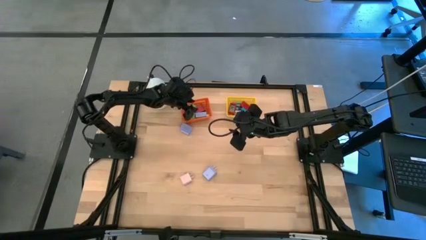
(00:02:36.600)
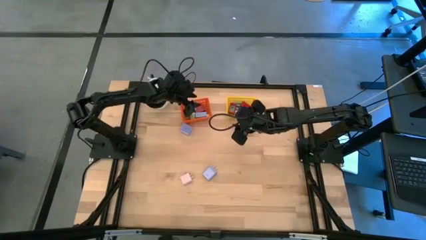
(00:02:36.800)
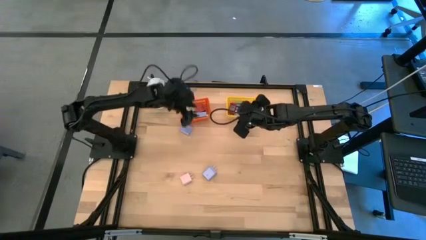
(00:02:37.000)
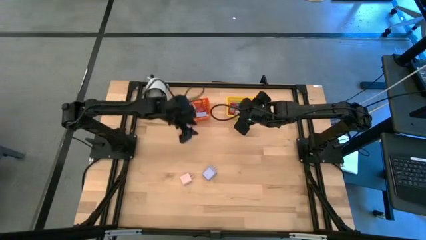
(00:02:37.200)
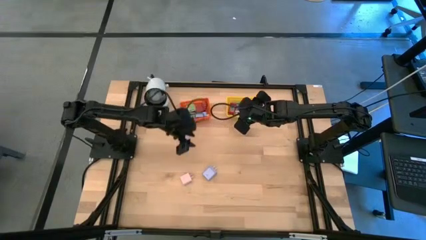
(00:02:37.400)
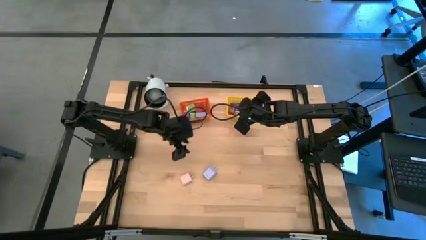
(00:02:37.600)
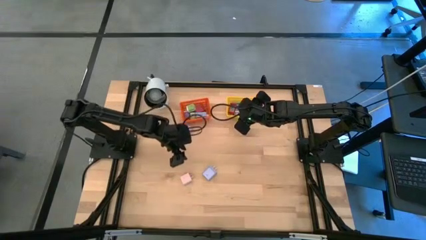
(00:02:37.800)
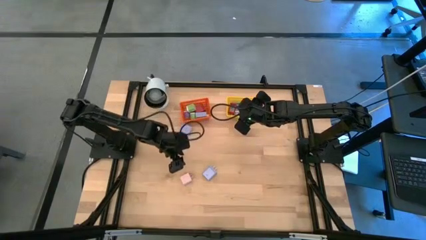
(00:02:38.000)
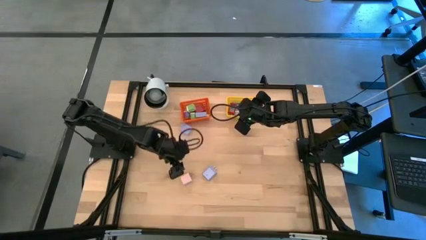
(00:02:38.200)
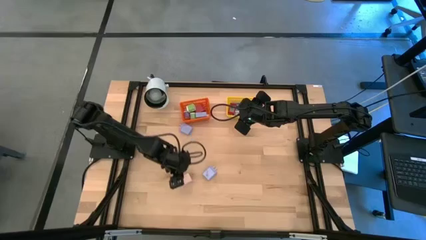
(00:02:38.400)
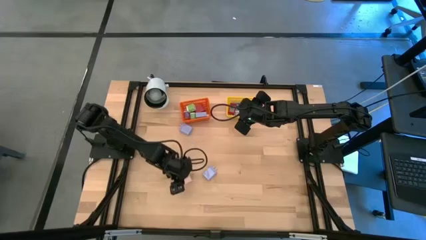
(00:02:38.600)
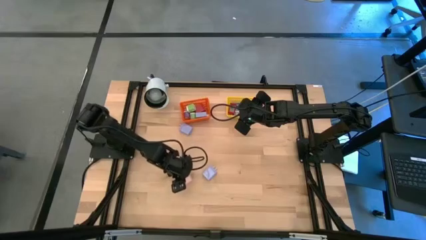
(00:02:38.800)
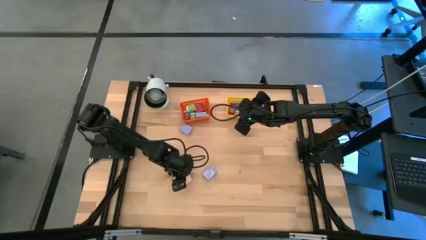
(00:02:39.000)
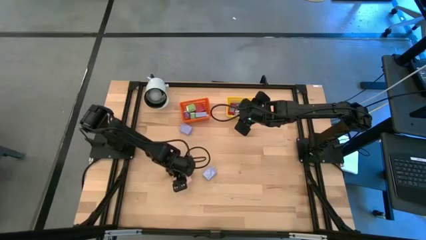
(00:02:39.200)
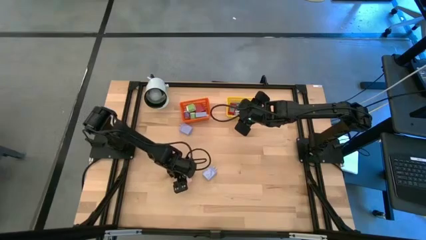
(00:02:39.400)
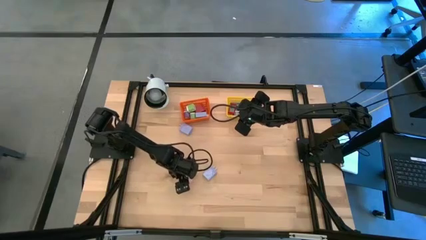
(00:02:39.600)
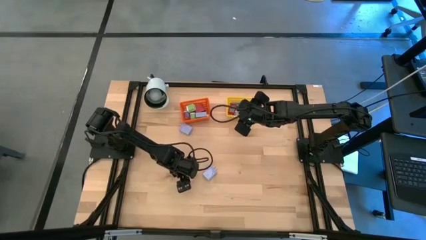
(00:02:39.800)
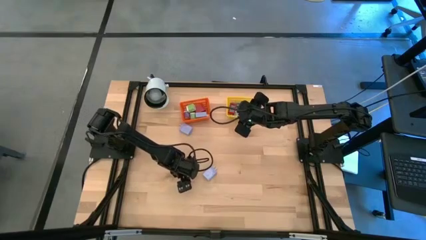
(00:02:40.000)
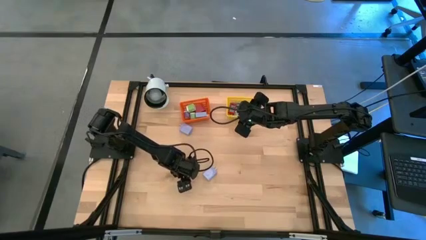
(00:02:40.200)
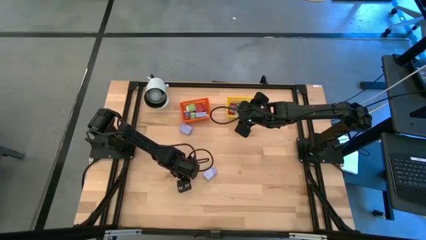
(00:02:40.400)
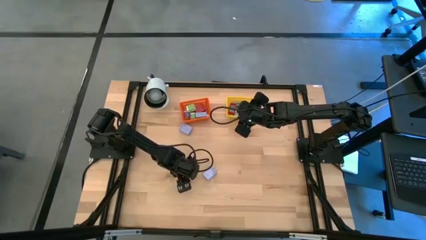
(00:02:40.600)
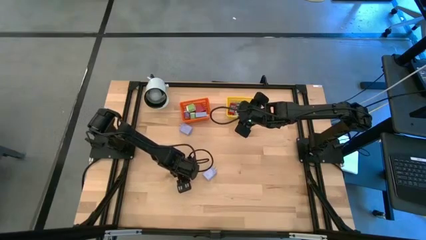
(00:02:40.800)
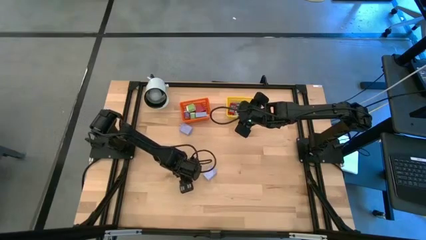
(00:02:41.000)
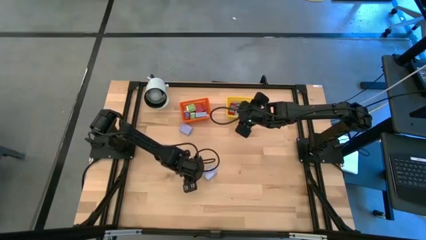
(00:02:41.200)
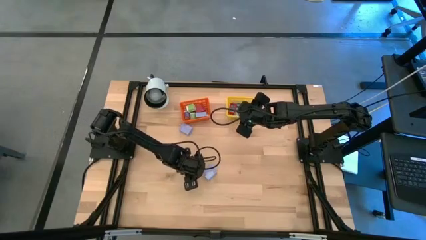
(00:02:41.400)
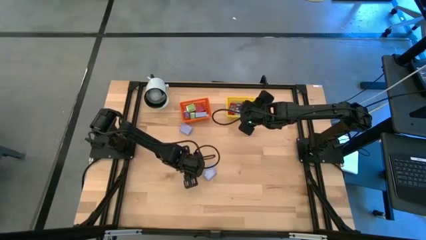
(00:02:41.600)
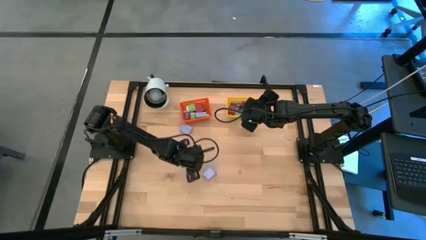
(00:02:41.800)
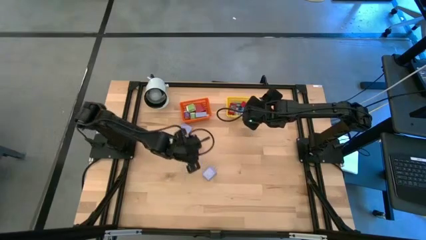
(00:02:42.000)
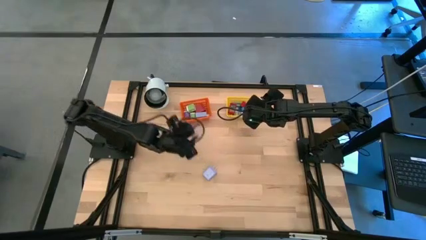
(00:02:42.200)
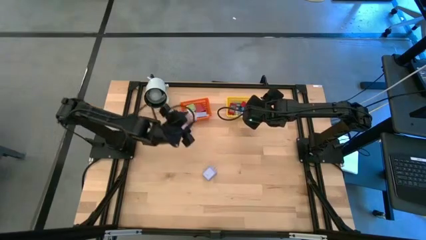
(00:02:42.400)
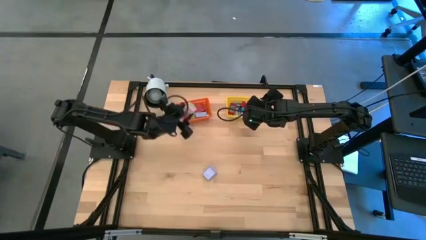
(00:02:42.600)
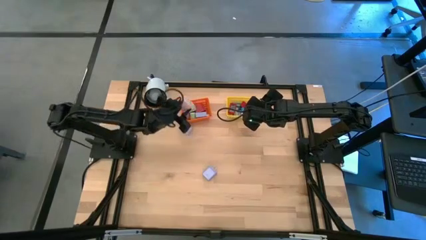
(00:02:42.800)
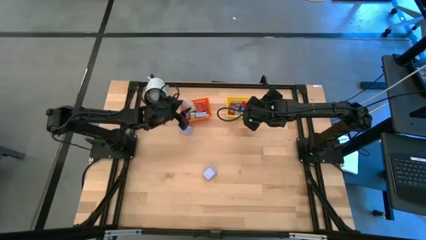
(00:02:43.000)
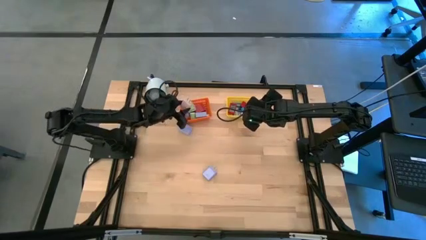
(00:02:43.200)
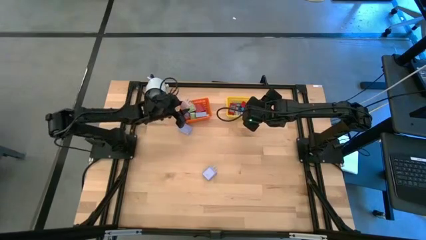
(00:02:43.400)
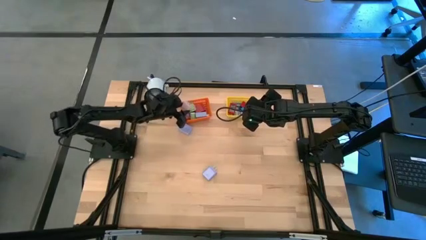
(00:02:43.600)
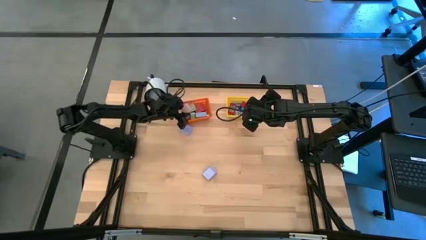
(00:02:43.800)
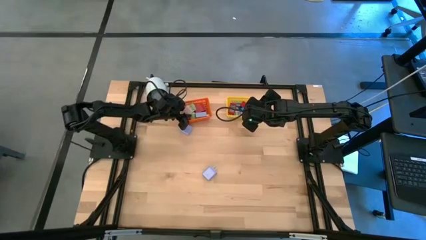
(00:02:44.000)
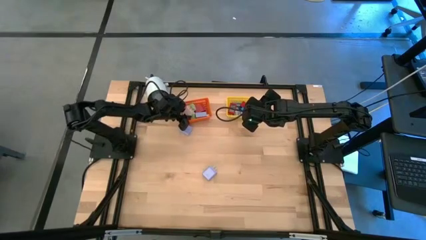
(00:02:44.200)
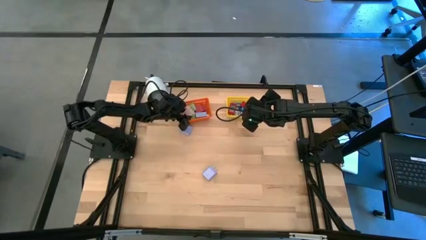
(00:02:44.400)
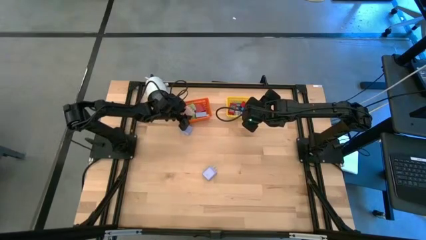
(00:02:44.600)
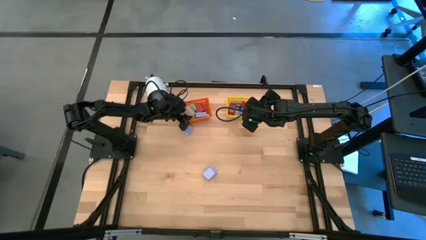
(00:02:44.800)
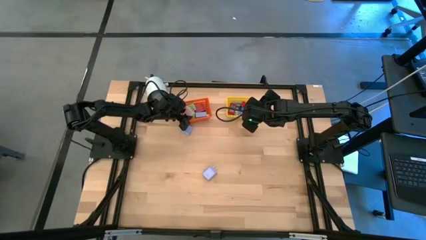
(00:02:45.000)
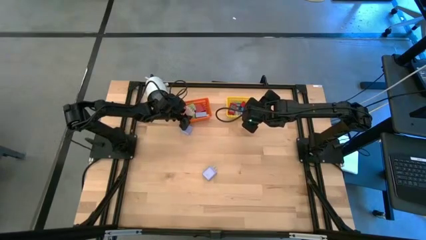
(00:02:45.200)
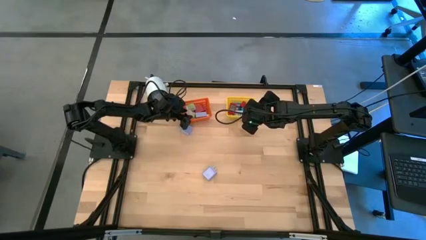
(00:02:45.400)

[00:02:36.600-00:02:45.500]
Task: Pick & Place Office items
Put the pink charger adapter into the orange bin

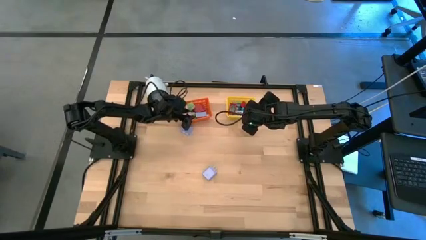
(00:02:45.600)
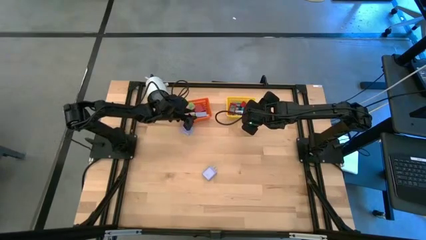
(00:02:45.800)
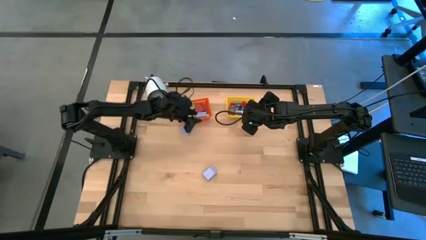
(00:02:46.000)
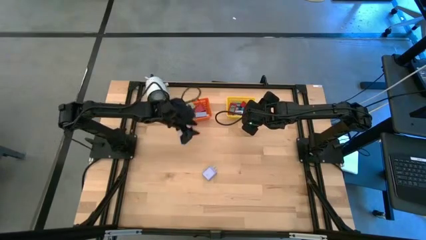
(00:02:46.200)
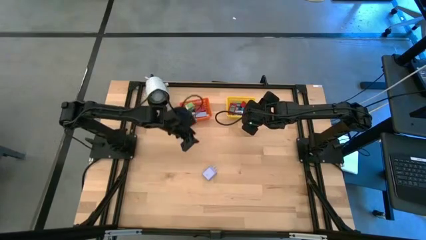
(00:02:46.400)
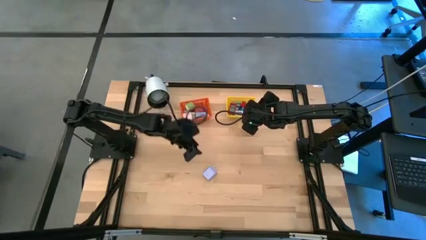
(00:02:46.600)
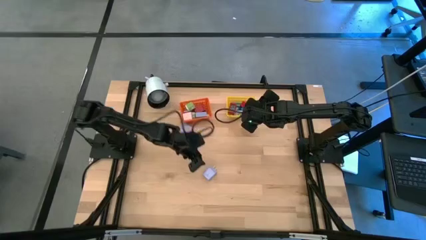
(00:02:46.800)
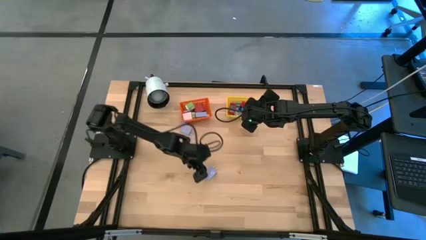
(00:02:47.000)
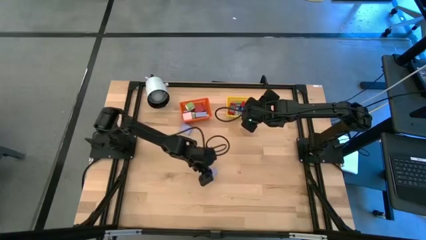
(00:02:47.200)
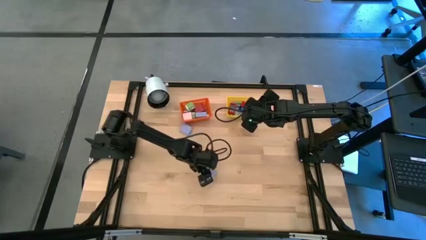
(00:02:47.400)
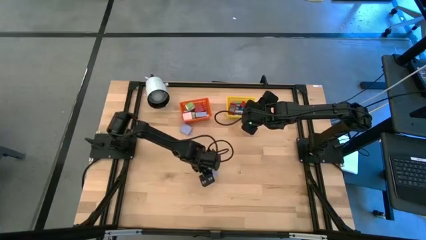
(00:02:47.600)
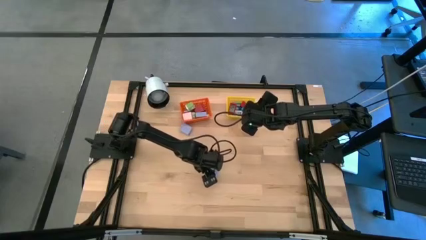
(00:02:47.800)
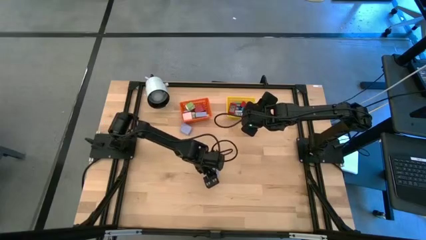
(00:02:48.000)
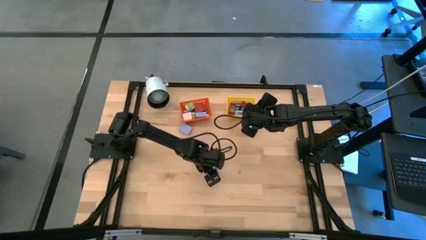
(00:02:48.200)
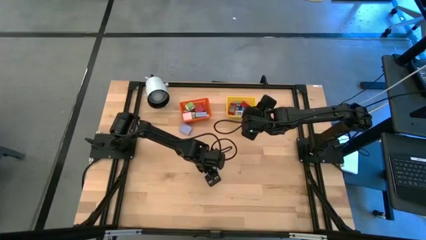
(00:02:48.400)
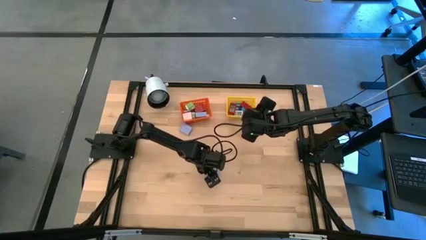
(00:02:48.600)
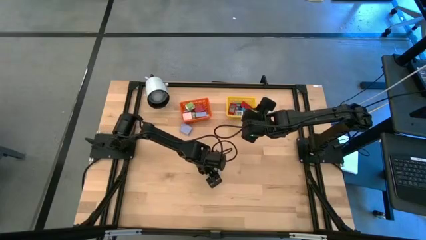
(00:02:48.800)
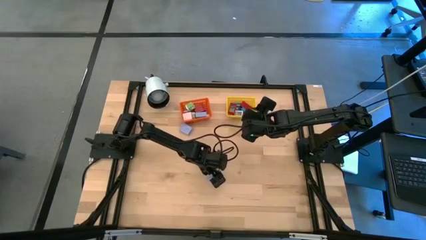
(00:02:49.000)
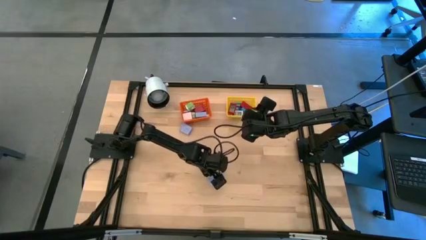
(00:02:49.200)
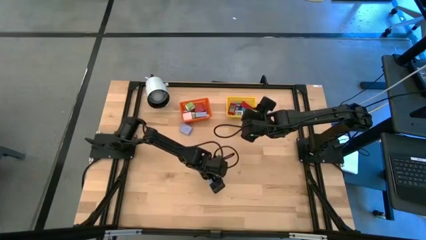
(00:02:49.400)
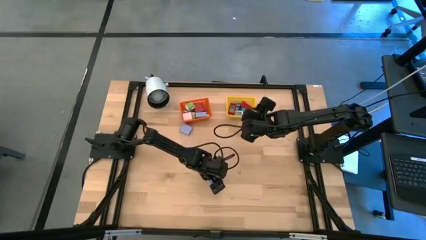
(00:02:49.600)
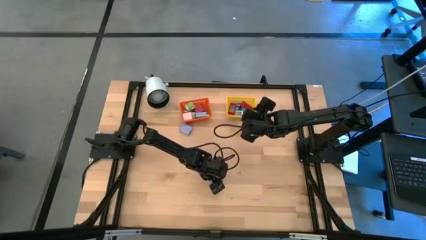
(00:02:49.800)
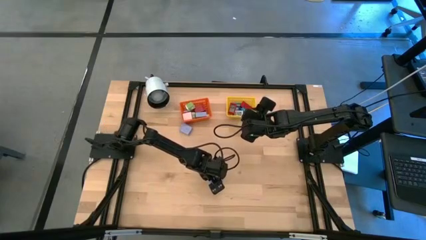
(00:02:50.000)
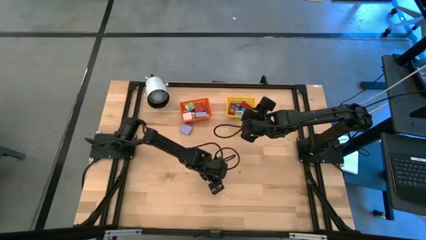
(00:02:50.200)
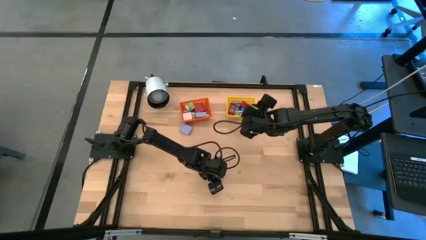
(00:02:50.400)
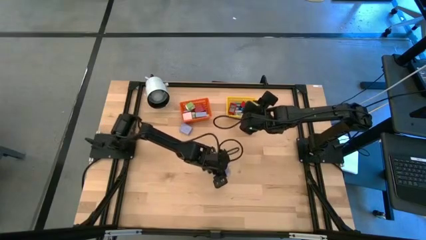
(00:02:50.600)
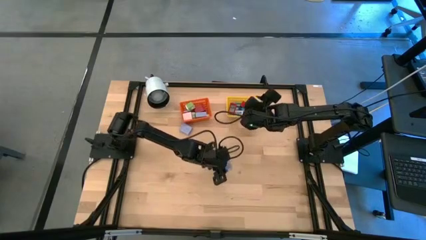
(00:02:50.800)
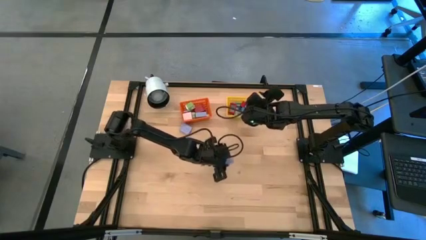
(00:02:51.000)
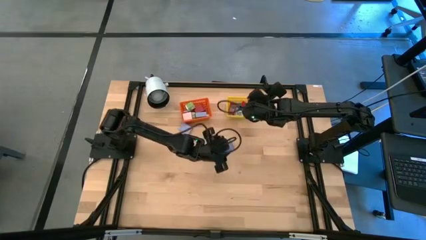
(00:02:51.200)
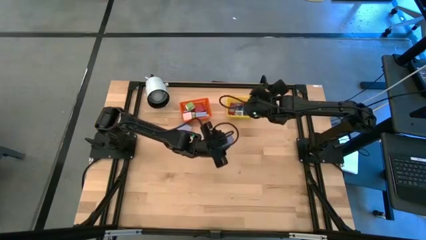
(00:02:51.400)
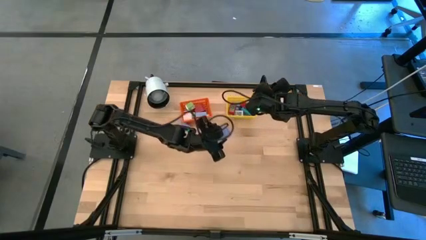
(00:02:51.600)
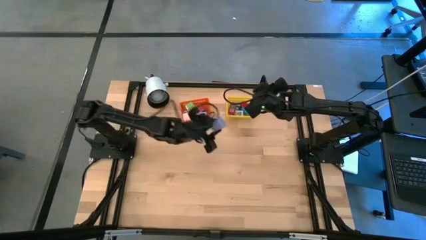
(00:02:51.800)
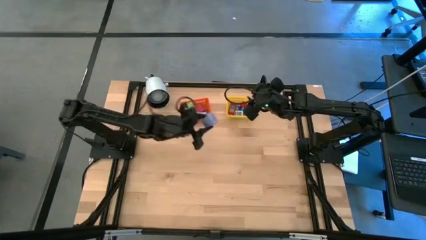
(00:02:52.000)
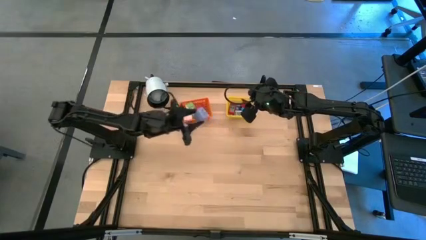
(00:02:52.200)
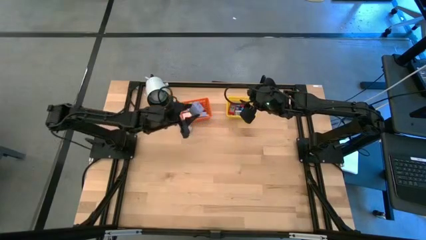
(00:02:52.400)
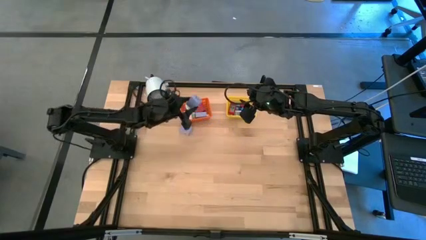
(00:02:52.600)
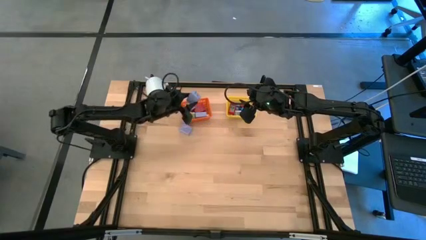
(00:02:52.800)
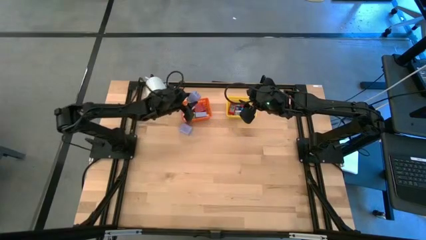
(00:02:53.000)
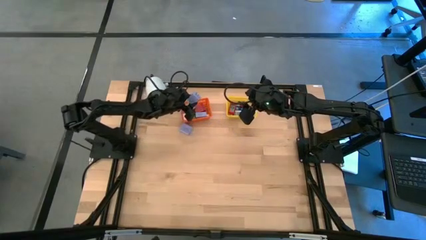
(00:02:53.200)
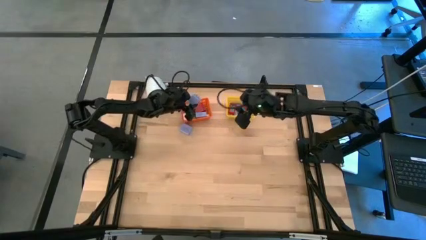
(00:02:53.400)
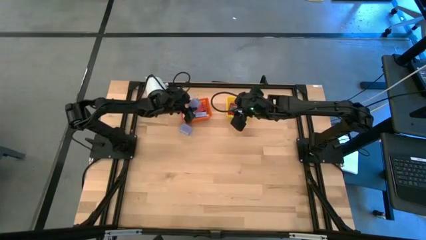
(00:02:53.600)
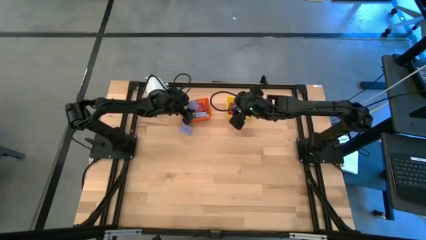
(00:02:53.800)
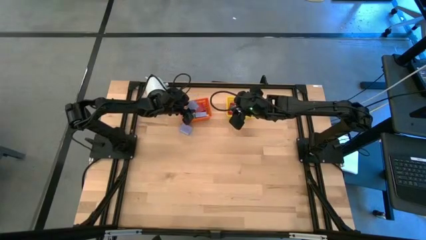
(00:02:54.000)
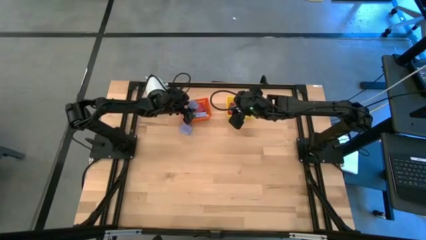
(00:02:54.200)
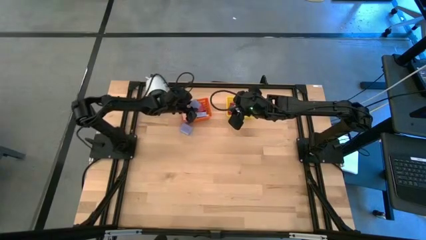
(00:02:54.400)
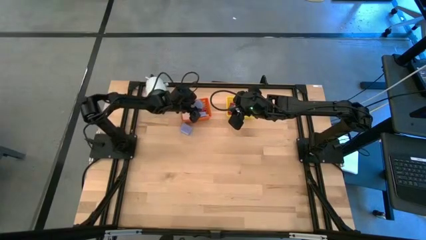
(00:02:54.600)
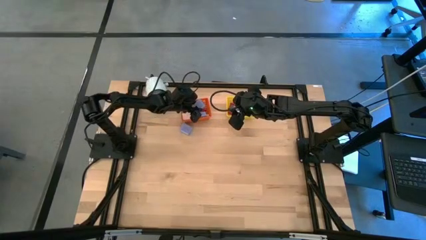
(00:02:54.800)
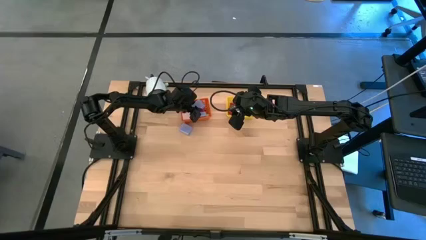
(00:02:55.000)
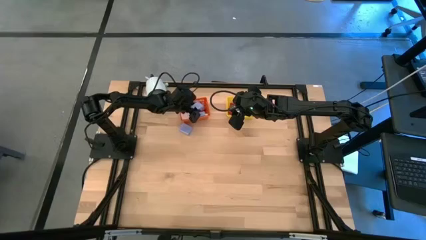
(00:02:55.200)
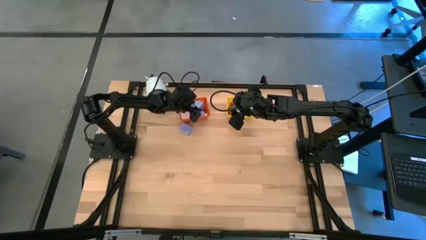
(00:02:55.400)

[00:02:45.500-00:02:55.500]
Put the bottom purple charger adapter into the orange bin
